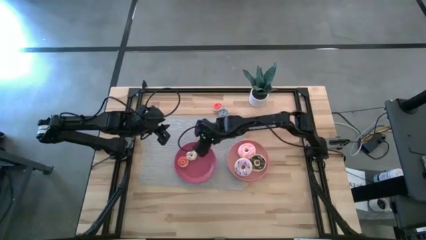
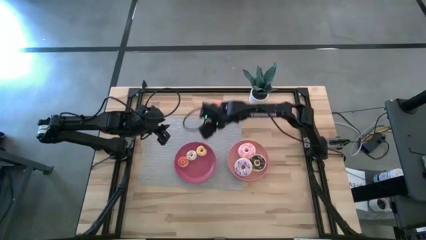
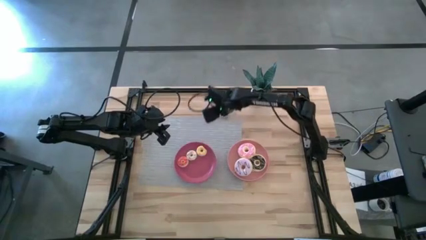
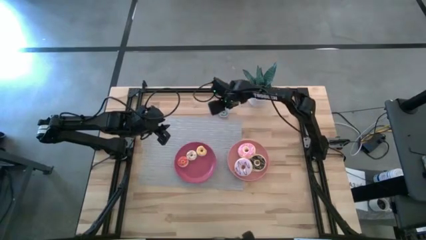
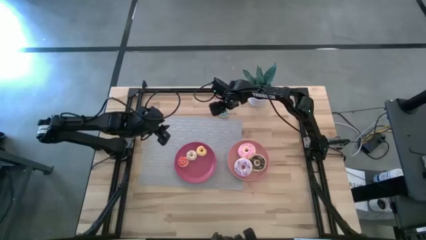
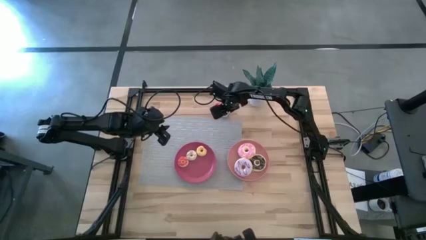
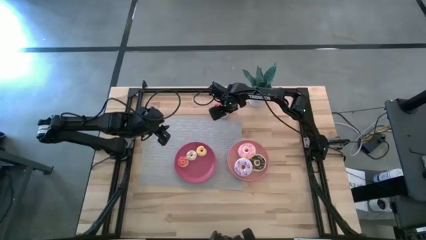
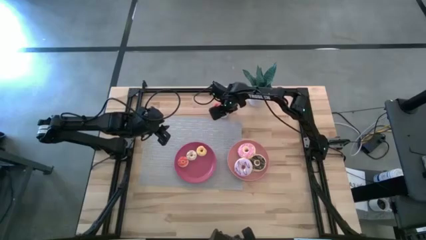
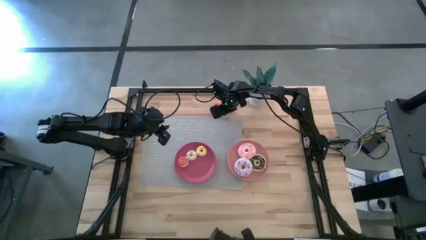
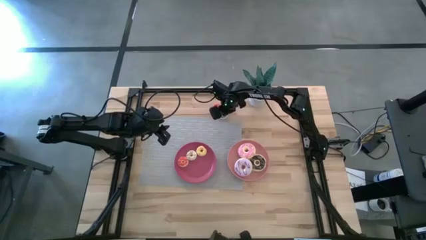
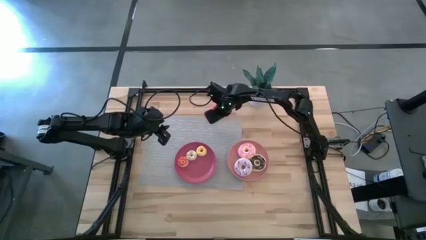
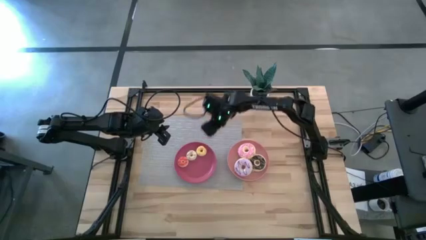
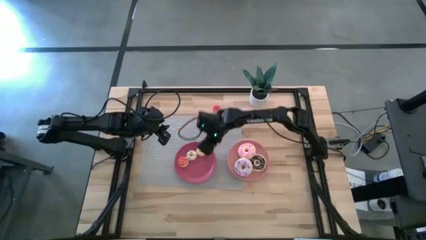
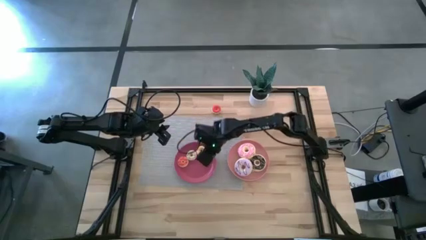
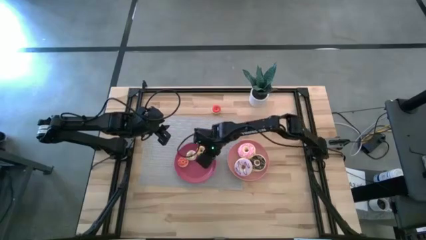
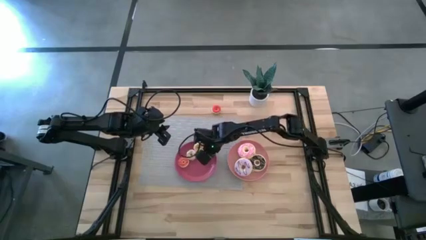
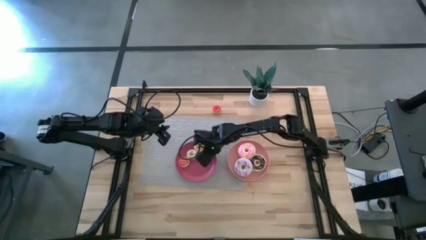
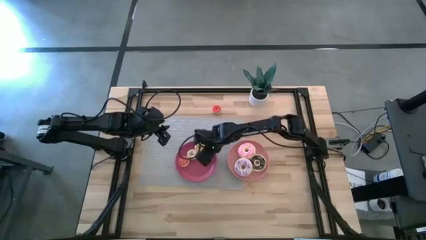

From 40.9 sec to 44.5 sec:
Task: Pick & Place donuts
Put the small blue donut on the pink plate

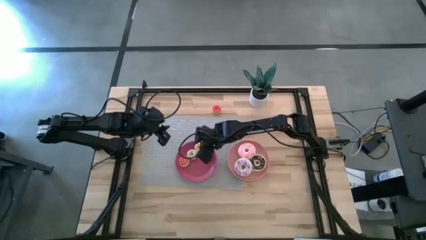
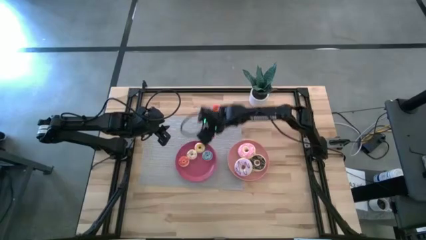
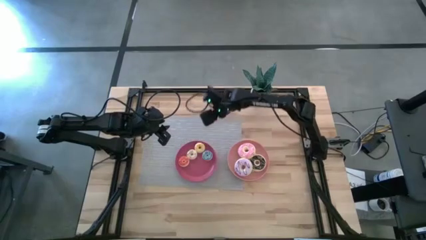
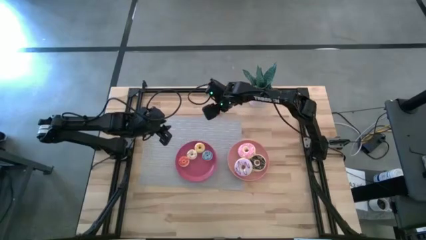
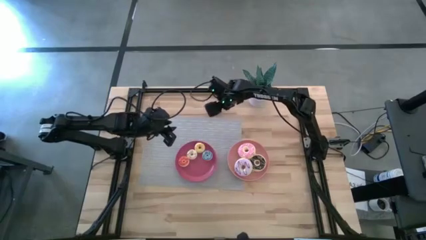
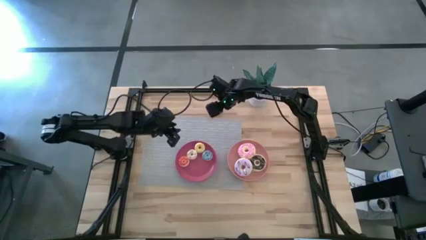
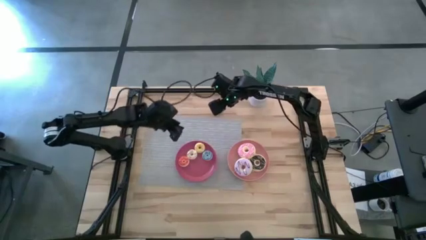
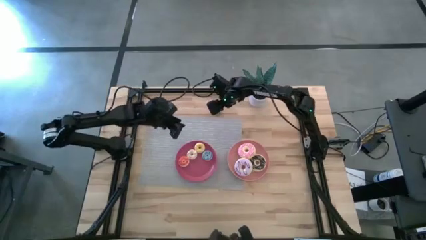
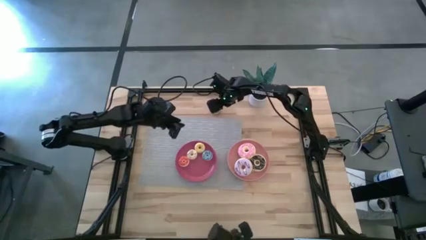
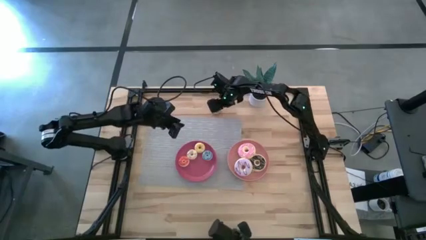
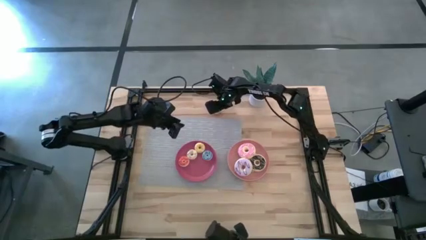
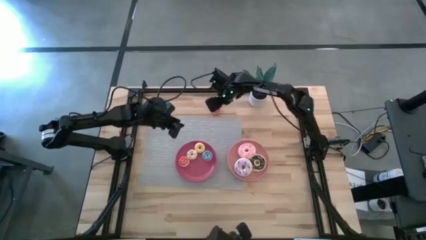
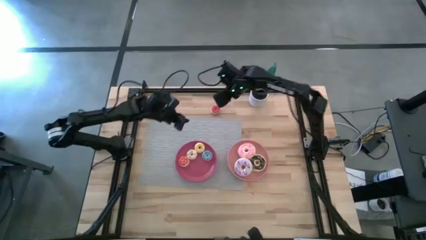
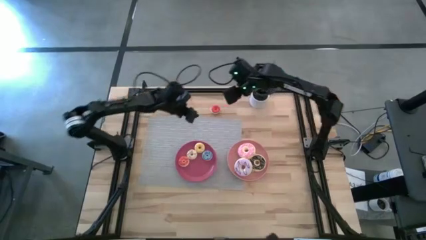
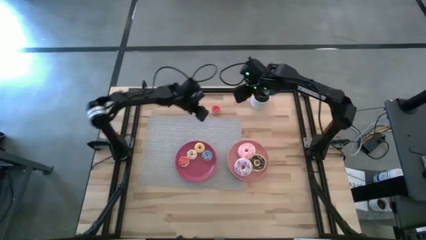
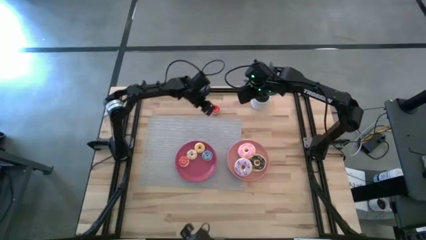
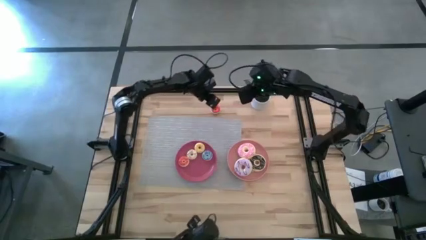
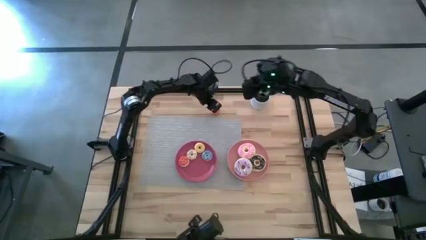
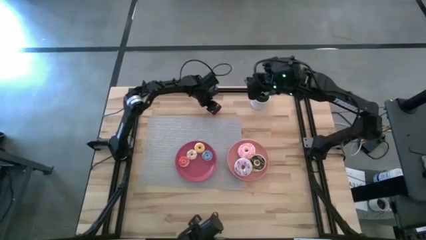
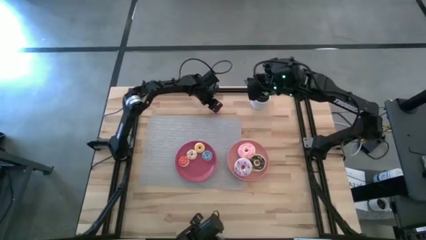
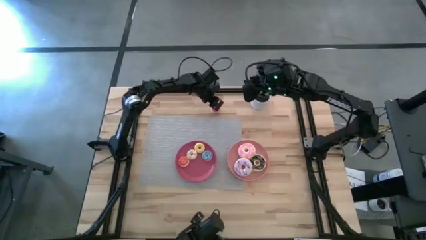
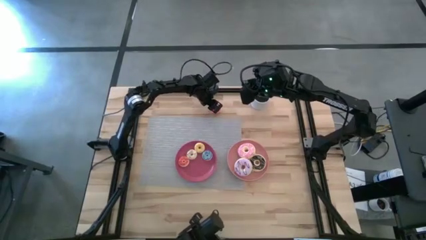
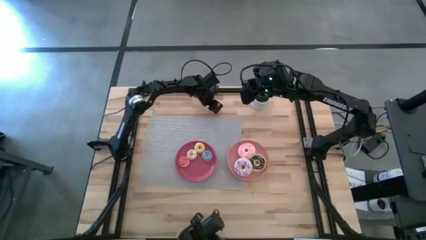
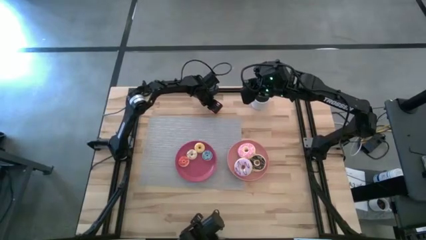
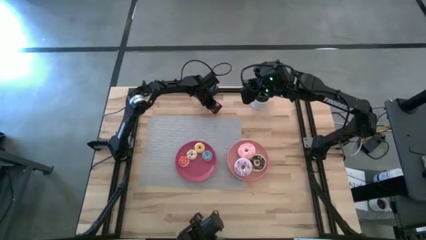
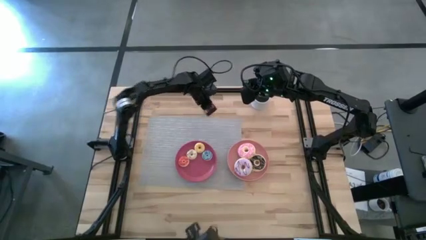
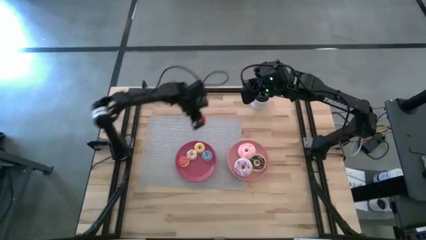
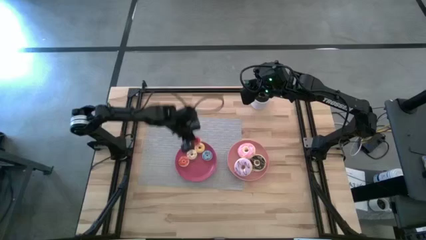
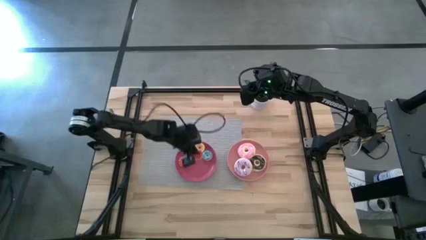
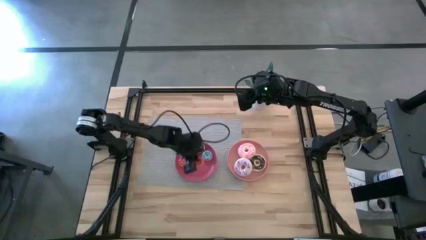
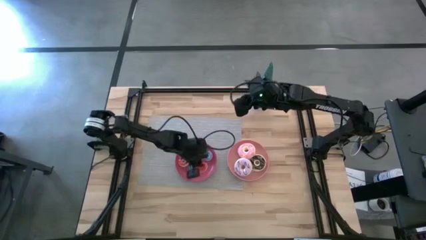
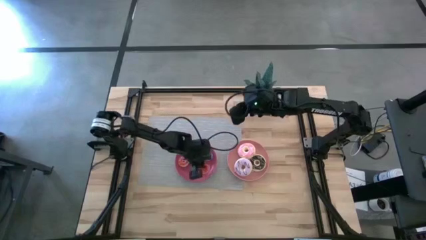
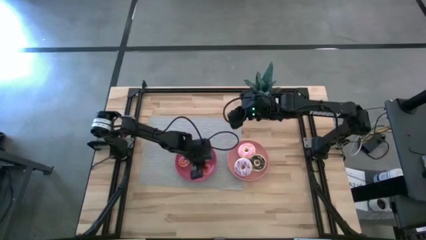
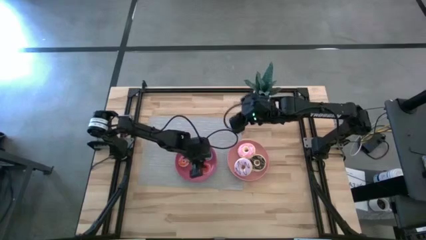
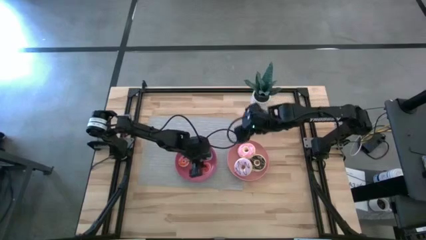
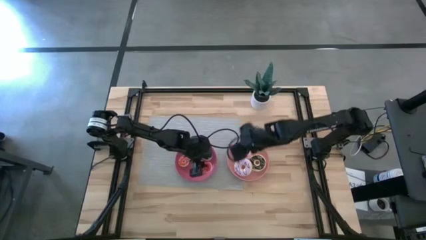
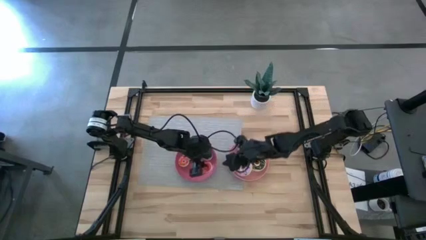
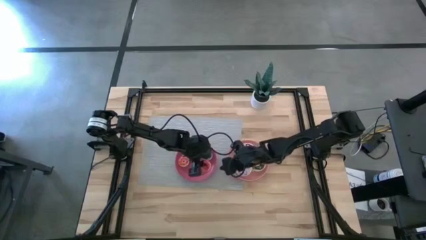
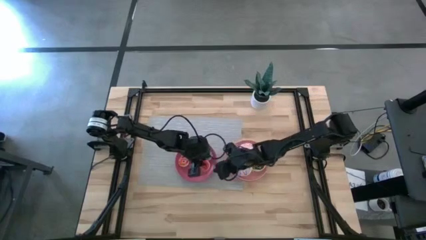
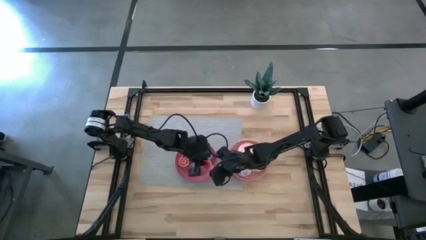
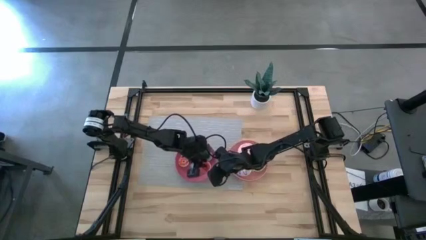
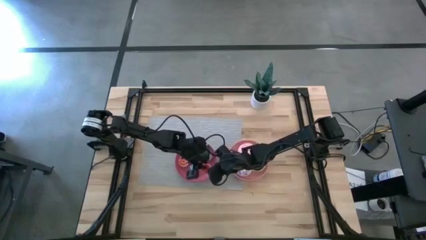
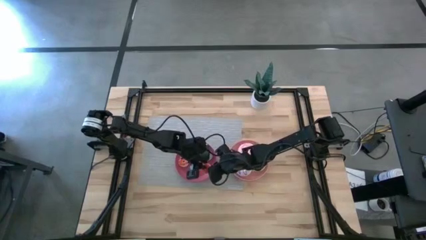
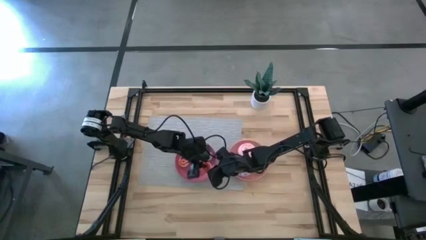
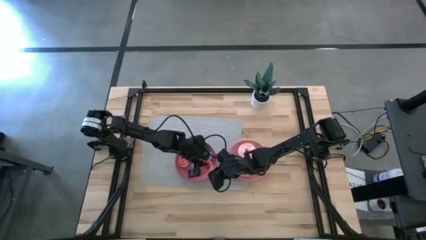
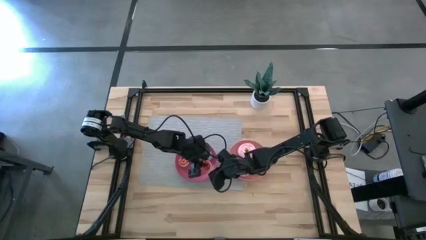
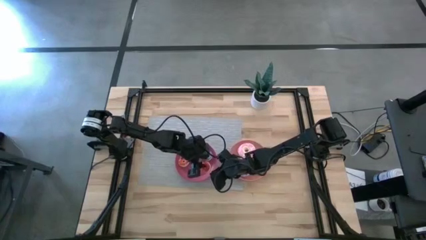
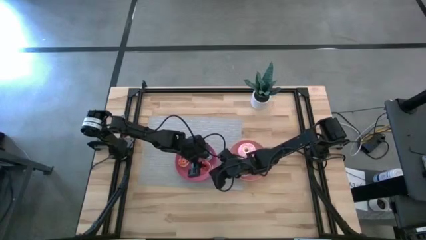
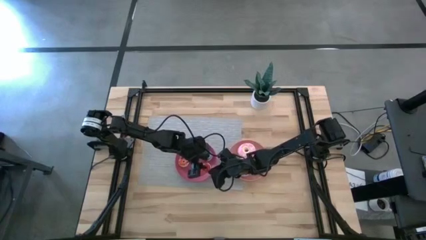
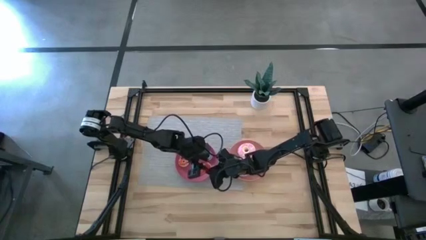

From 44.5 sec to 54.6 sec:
Put the small red donut on the pink plate

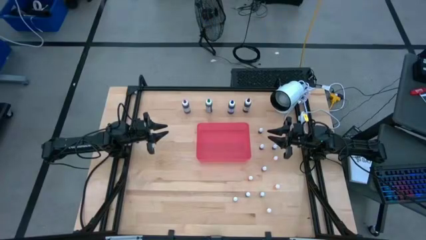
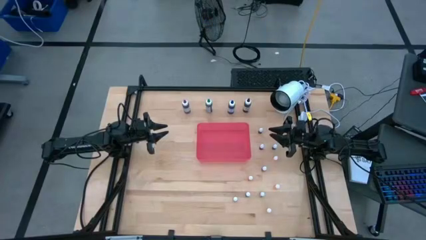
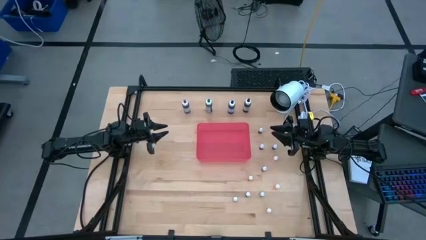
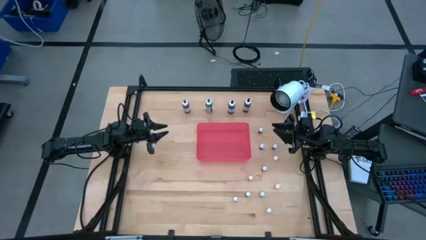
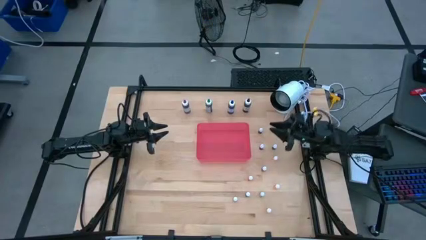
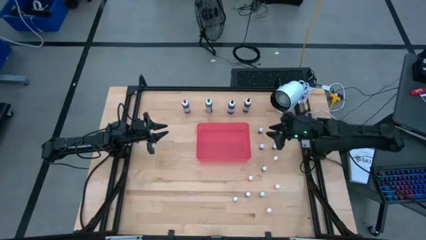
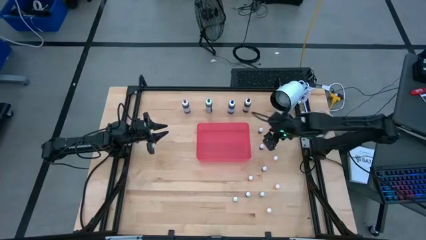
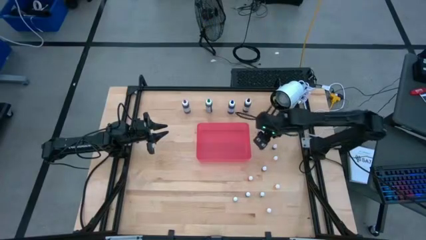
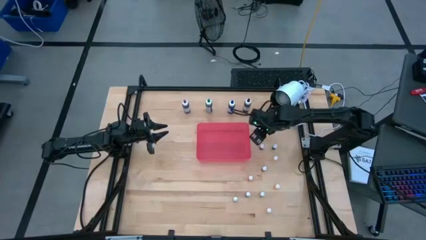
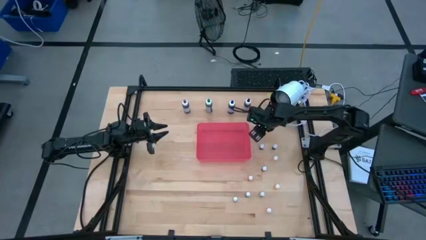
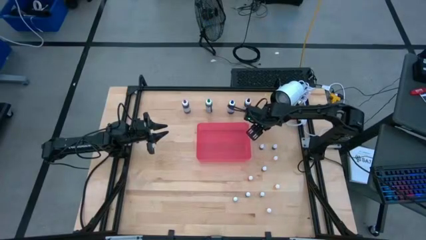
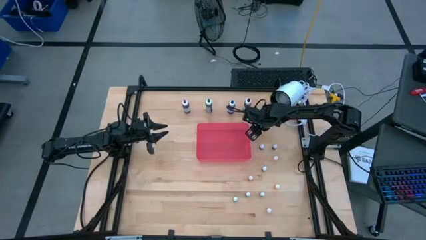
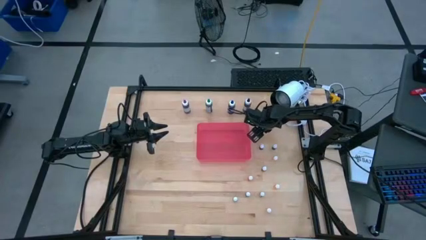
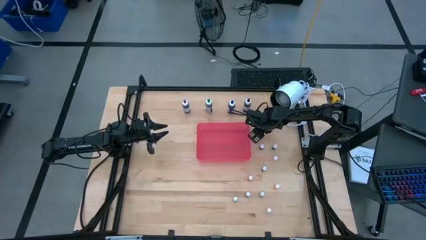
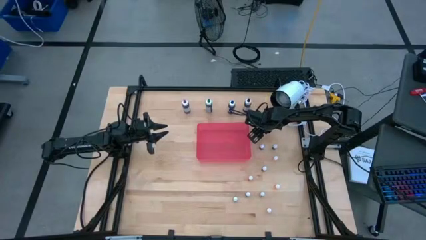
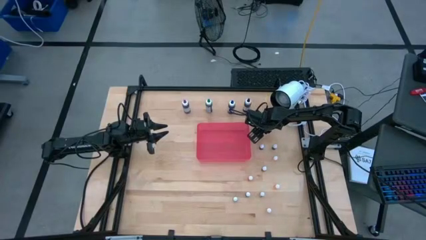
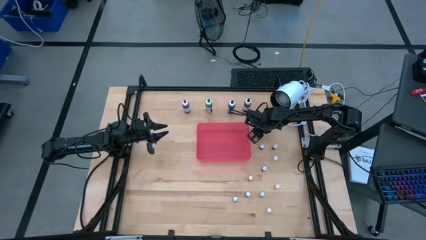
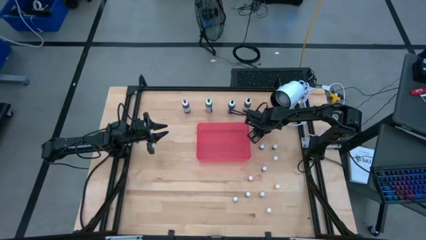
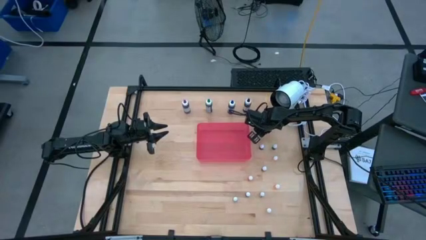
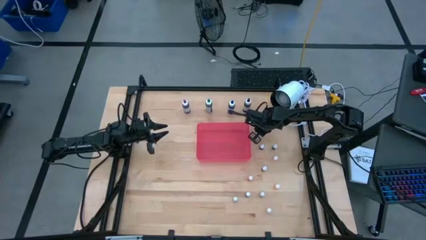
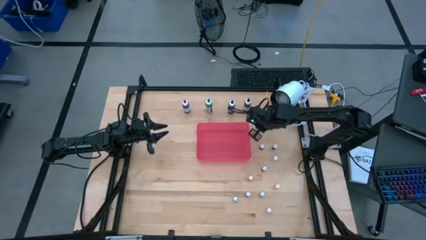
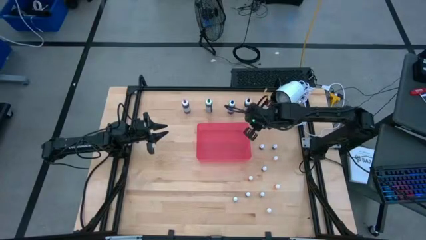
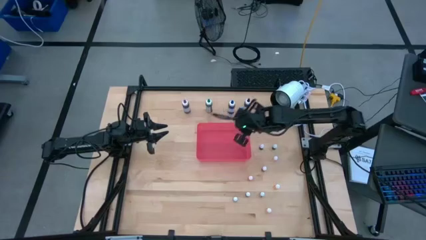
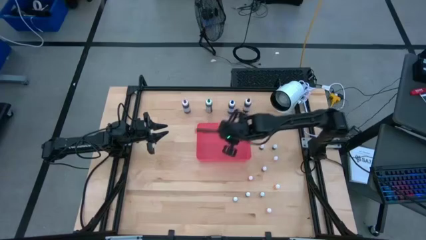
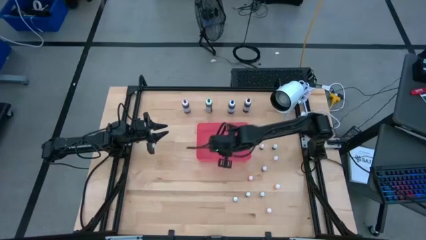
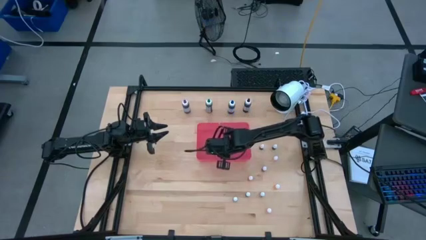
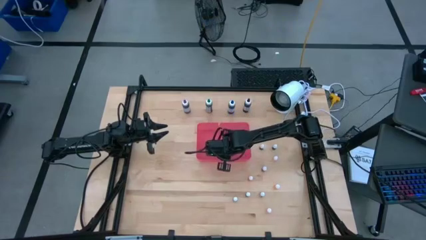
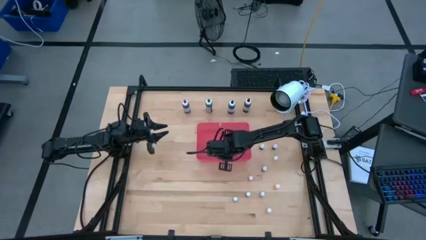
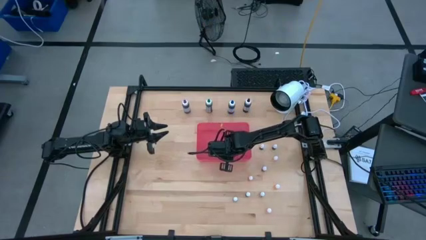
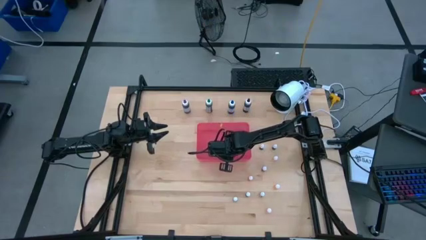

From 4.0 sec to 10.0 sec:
Task: Pick & Place food coloring
Put the small blue food coloring bottle into the red bin
